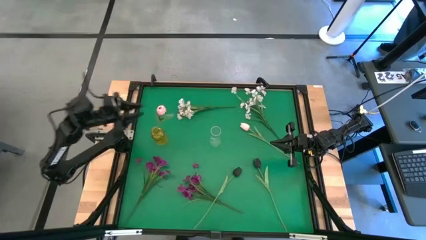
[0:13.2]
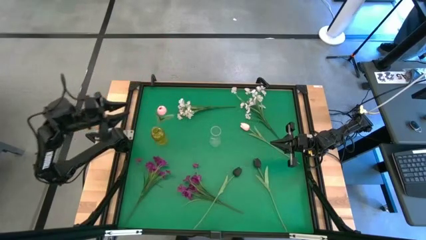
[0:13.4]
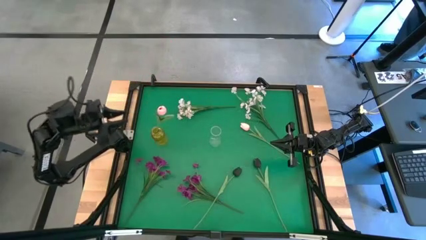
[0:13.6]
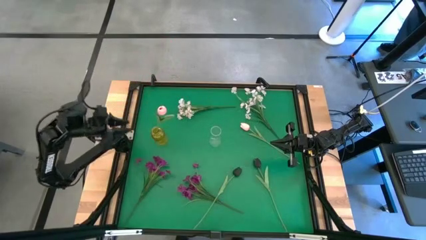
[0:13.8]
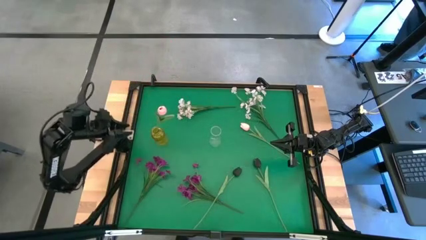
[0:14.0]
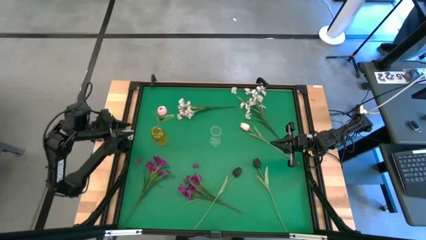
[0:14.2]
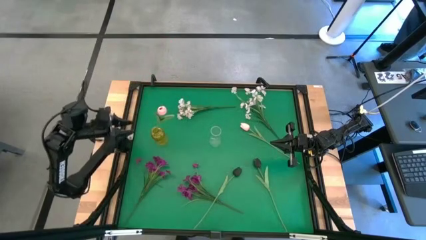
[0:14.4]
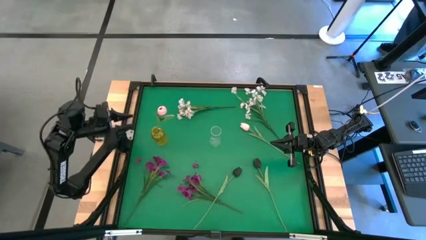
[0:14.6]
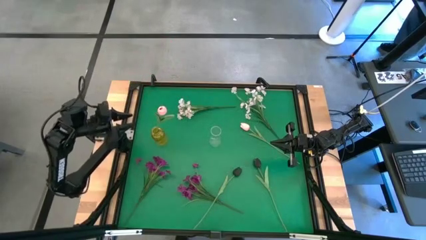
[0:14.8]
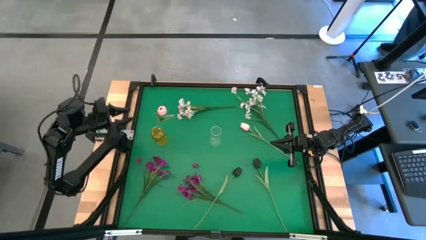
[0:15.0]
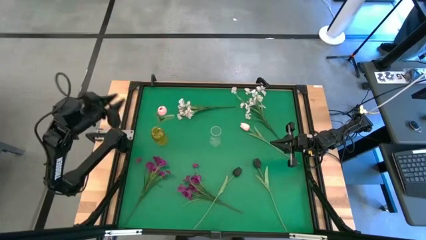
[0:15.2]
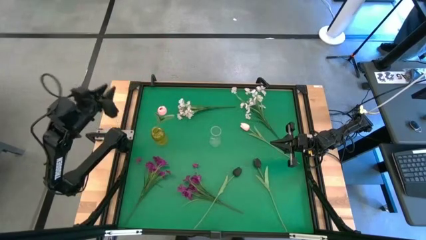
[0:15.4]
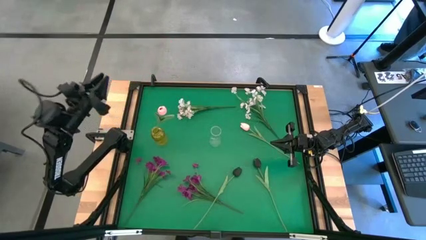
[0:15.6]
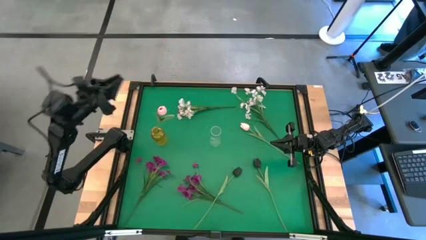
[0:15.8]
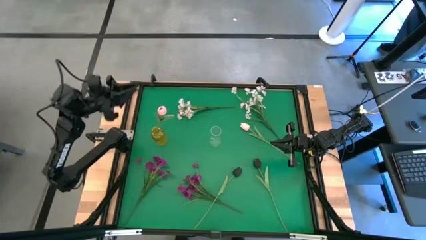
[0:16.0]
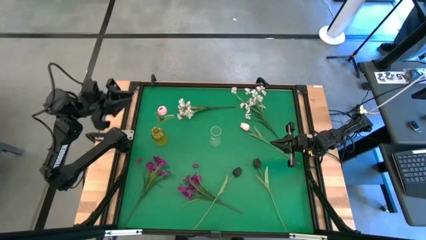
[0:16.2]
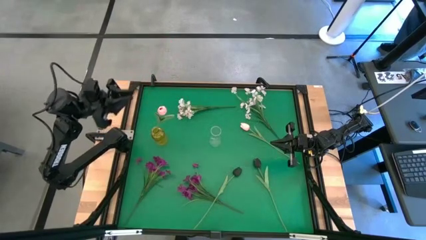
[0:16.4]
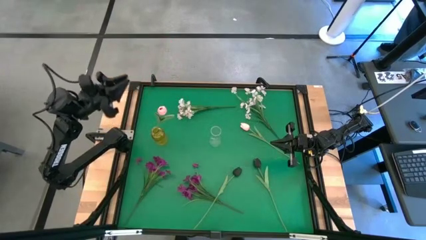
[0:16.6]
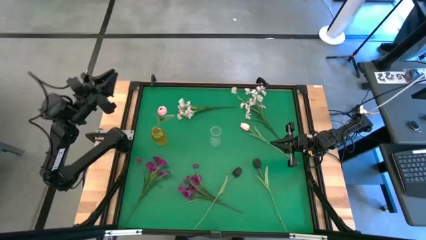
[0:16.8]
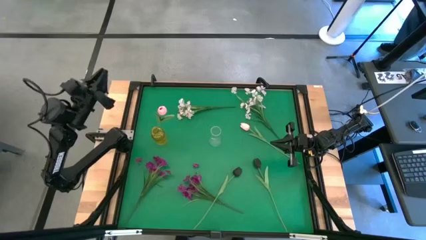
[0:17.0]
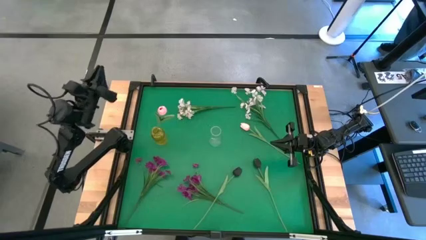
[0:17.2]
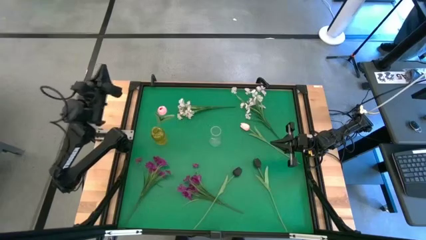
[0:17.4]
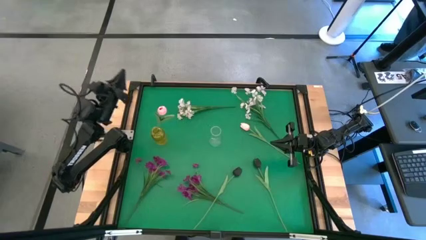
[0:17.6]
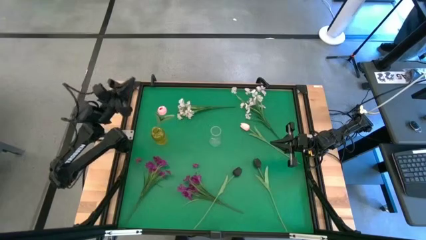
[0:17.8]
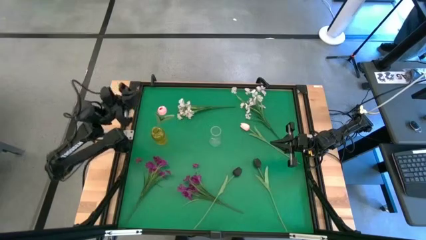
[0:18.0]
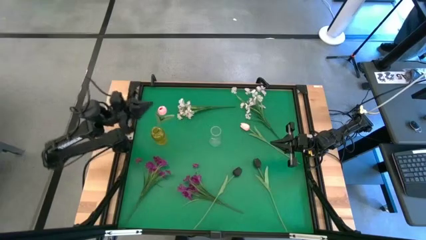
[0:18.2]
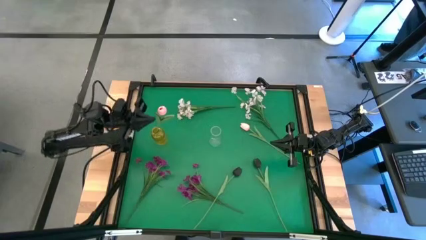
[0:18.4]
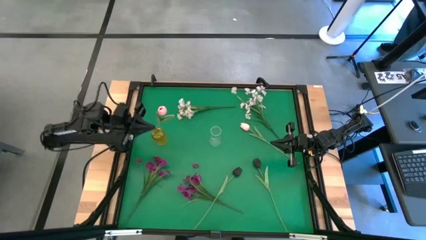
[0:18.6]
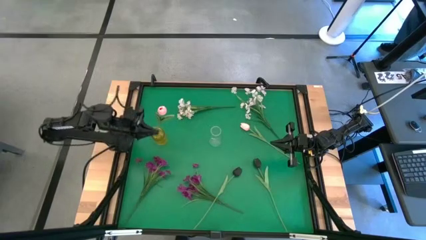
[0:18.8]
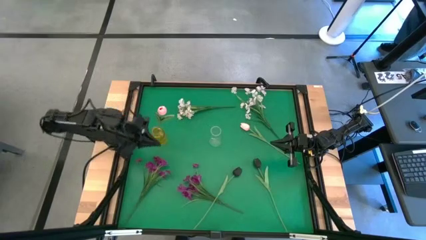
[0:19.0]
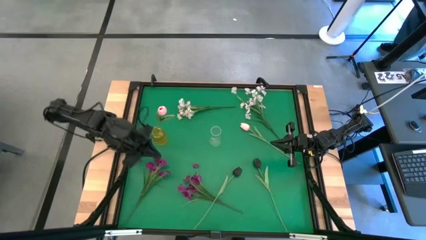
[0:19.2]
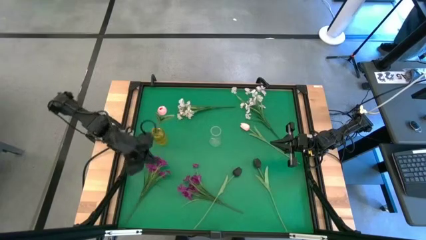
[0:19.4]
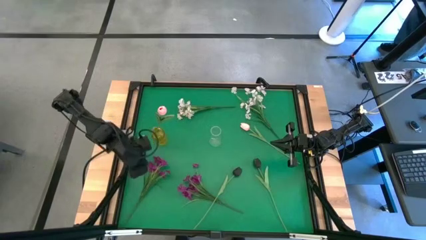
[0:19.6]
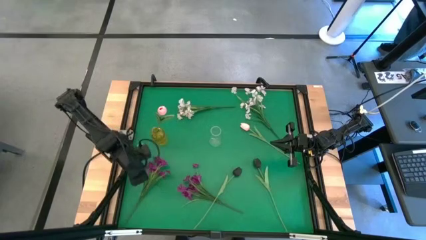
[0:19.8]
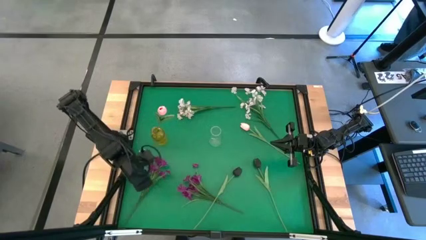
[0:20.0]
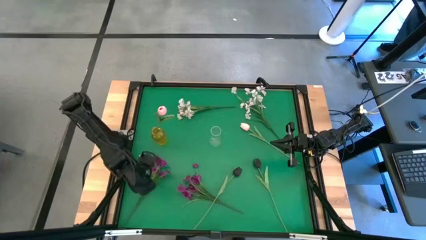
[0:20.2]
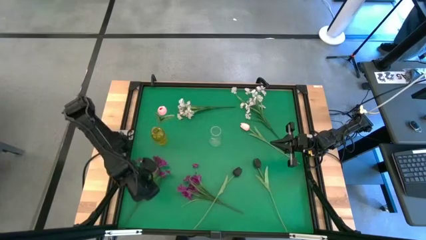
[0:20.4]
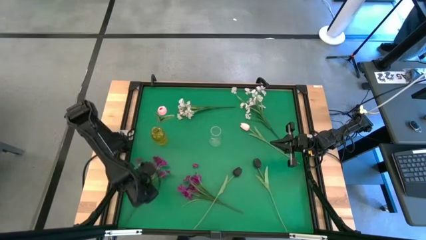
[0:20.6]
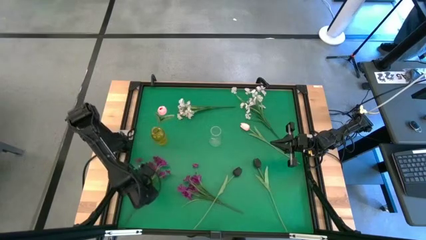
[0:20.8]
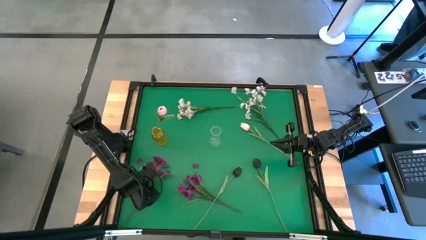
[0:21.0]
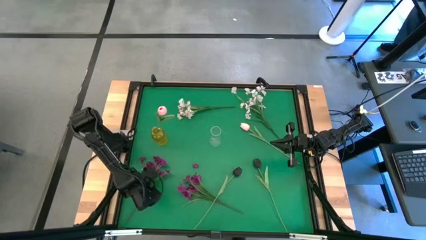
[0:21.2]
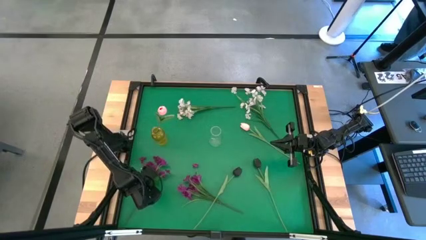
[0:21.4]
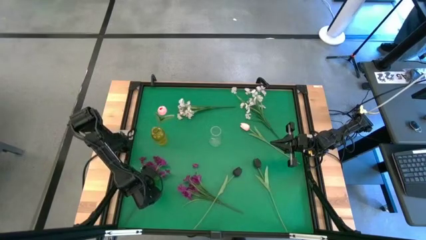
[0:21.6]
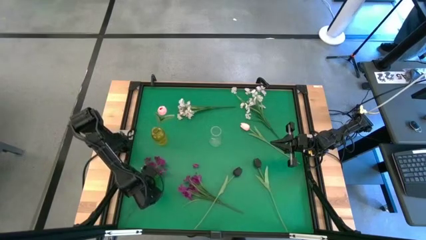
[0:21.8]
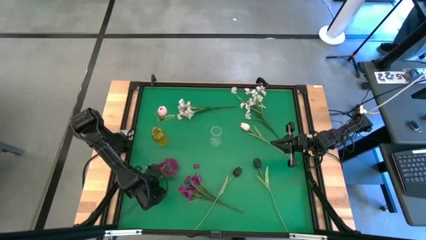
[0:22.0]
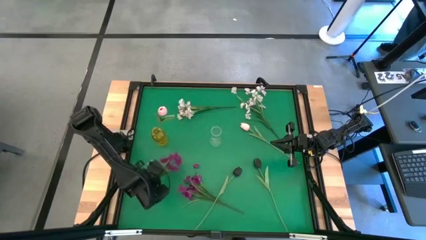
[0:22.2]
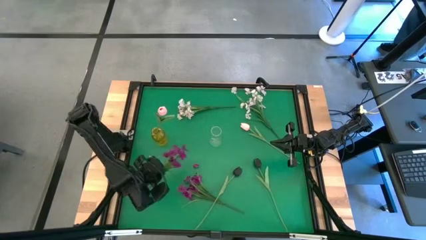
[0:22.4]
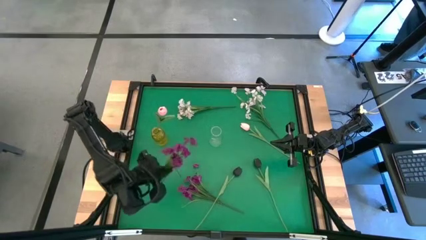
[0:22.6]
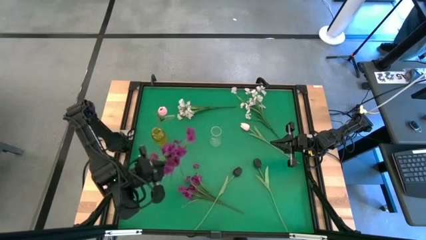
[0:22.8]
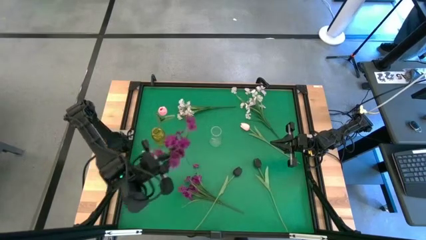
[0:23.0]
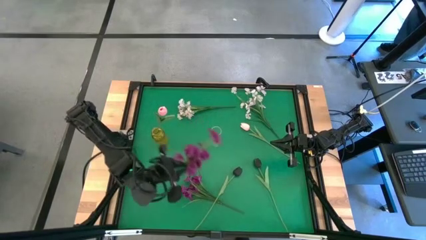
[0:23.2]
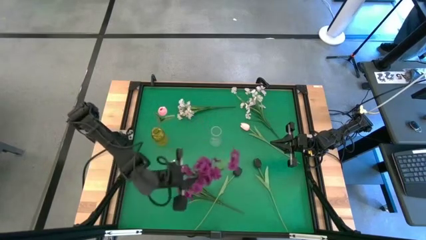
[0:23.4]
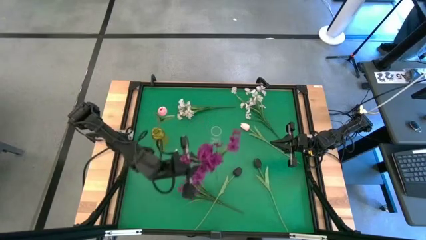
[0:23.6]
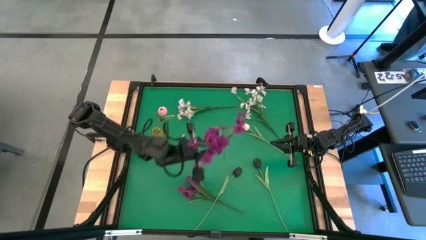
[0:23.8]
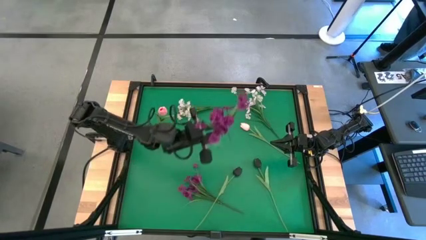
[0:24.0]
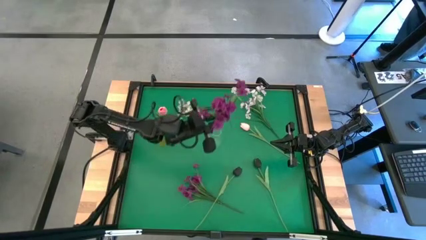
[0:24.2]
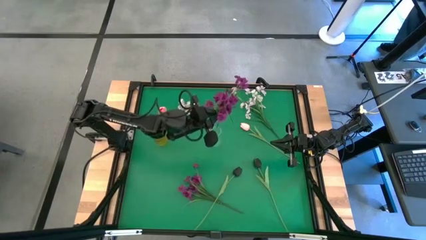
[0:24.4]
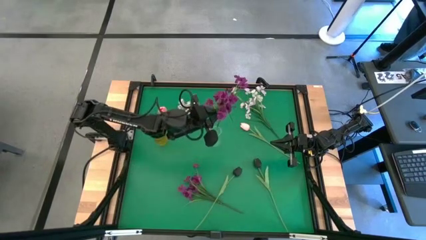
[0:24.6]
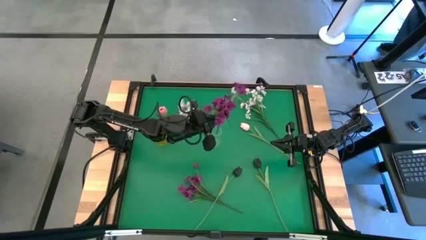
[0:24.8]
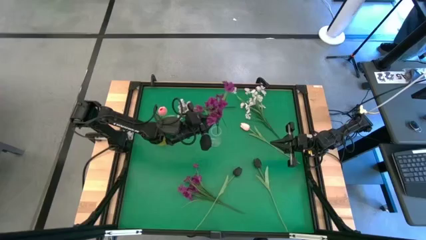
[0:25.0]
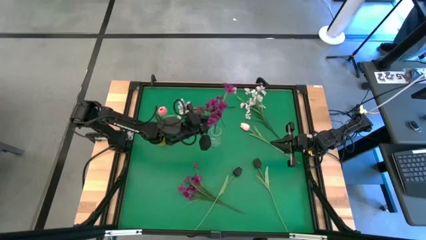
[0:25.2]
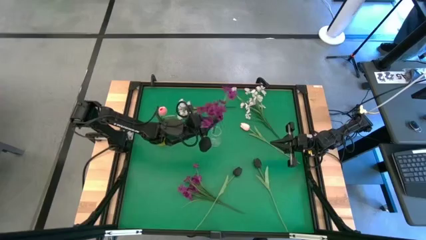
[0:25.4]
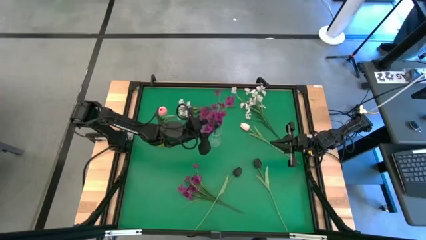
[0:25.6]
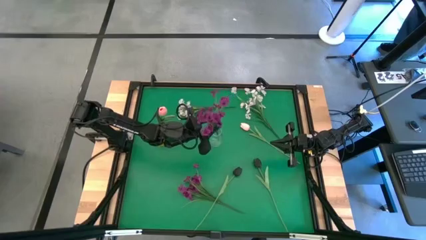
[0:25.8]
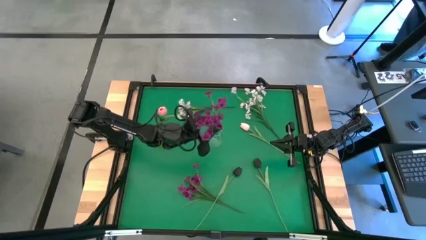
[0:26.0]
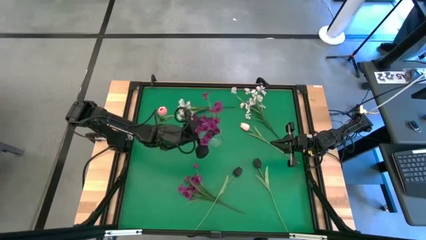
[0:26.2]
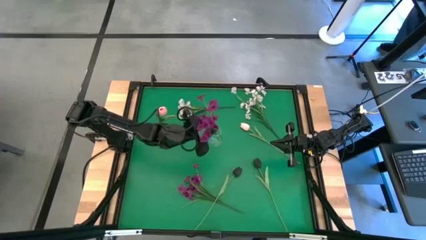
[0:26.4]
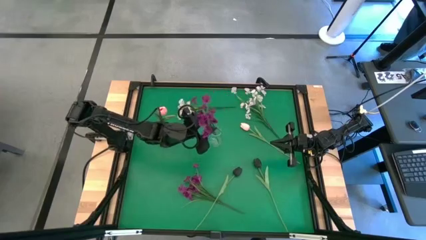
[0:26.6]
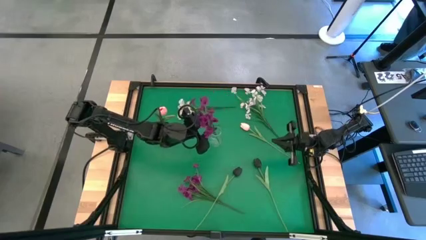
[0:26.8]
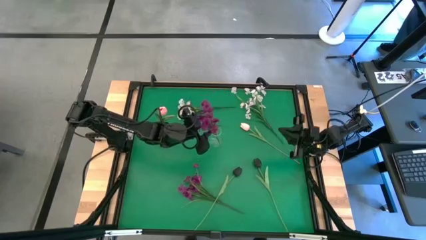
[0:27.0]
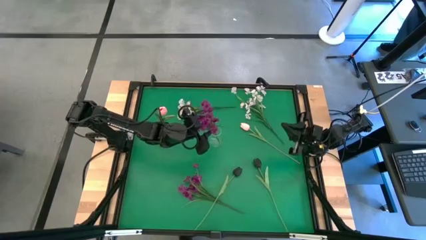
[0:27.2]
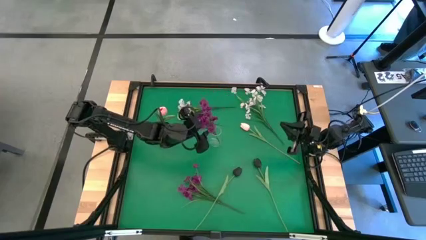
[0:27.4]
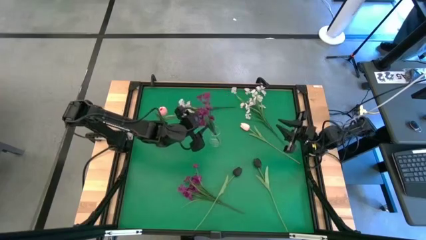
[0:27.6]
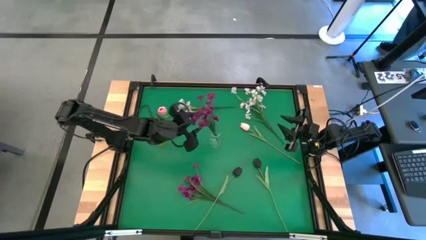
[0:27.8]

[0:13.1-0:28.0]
Task: Sort flowers into vase by color
Put the left purple flowers into the transparent vase

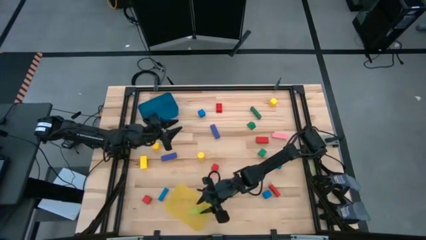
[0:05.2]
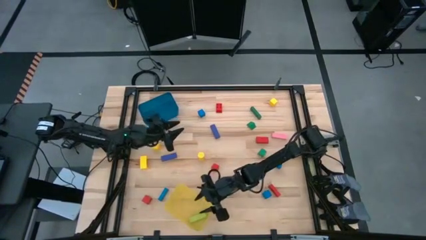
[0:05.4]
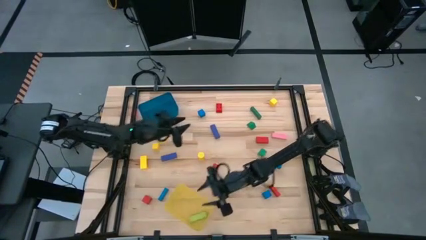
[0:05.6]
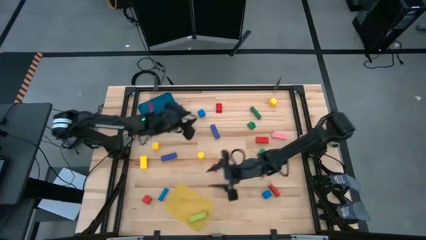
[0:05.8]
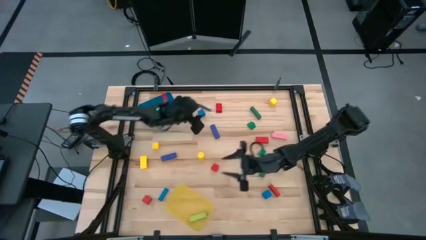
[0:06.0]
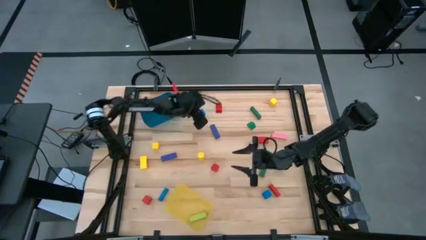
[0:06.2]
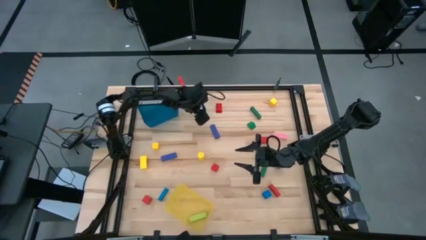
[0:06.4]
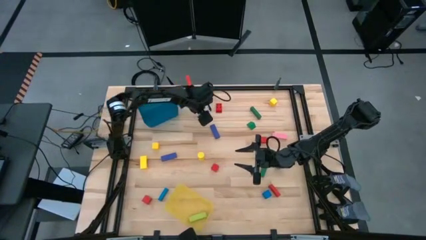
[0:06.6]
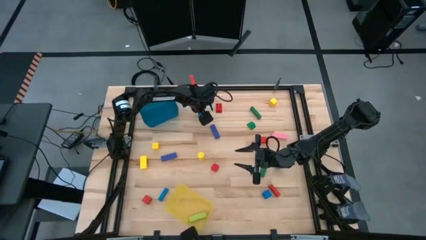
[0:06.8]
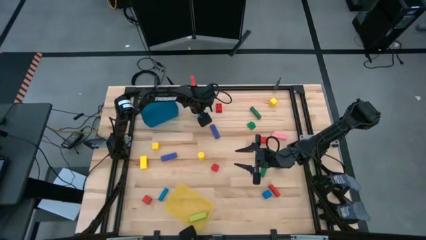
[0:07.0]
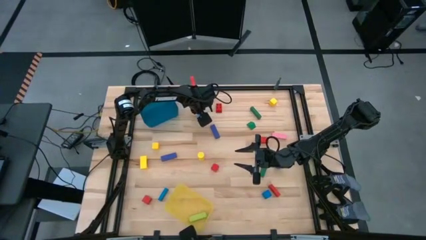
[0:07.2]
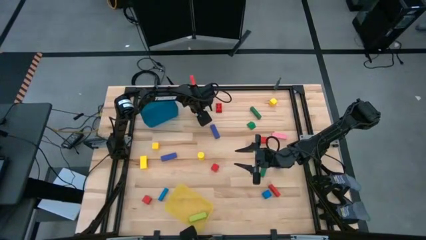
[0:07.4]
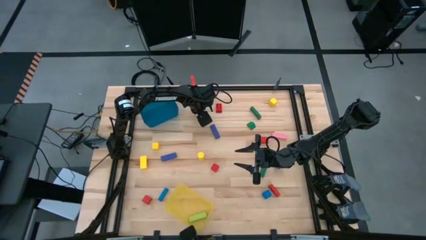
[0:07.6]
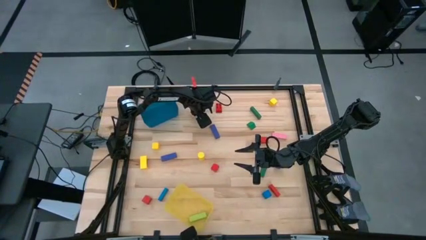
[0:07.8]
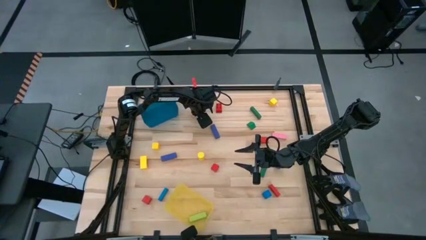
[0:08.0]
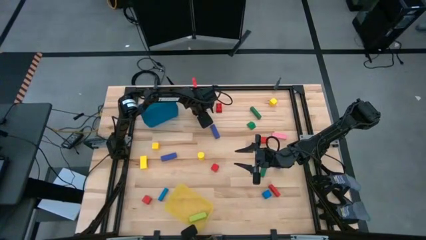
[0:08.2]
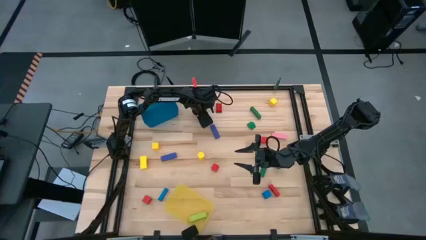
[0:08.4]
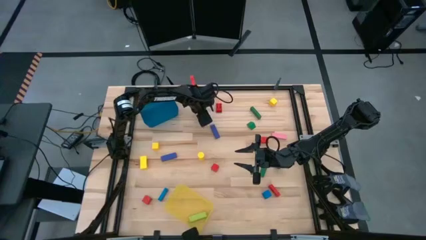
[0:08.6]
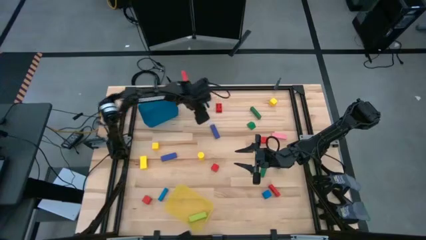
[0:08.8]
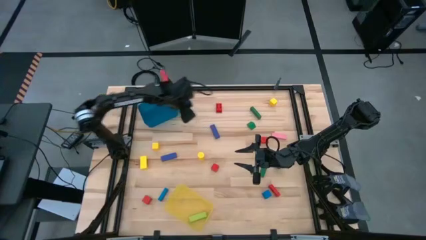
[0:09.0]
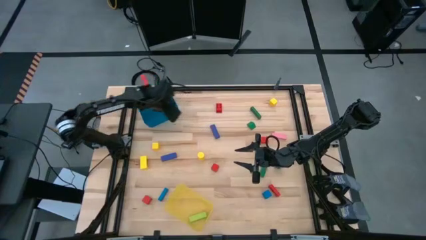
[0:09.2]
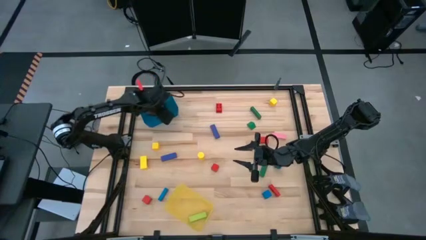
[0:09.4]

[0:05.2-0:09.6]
Task: Sort blocks by size
Put the top small blue block into the blue bin
